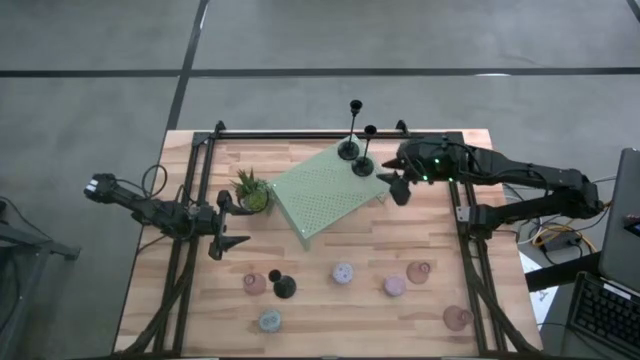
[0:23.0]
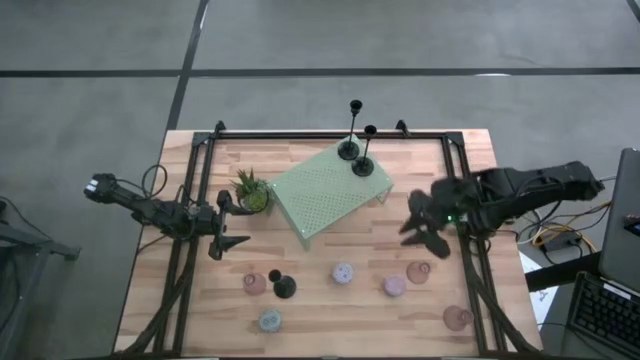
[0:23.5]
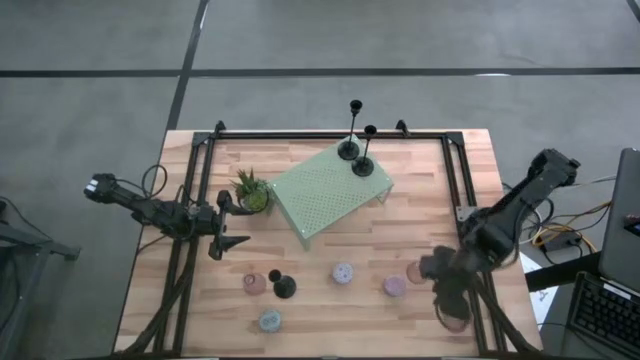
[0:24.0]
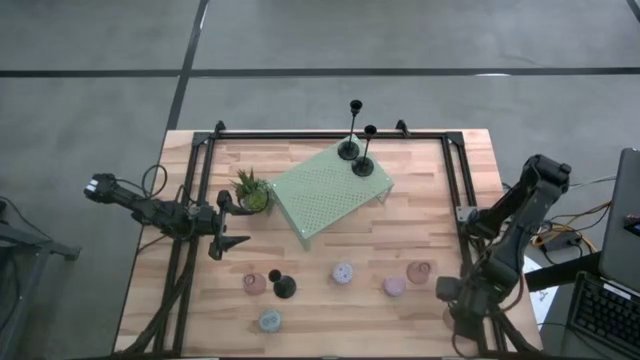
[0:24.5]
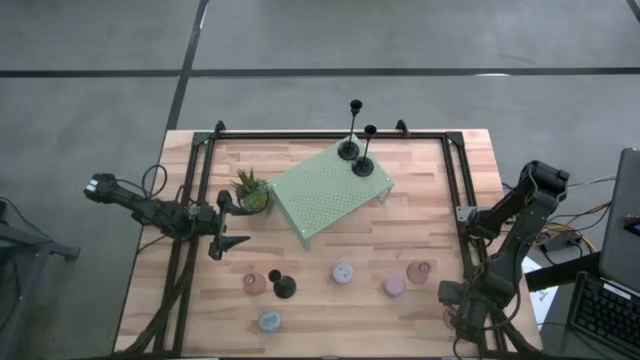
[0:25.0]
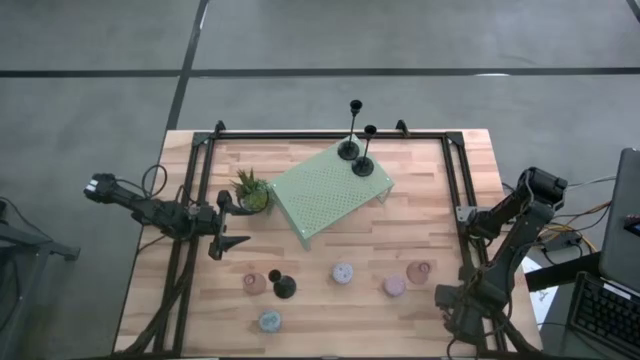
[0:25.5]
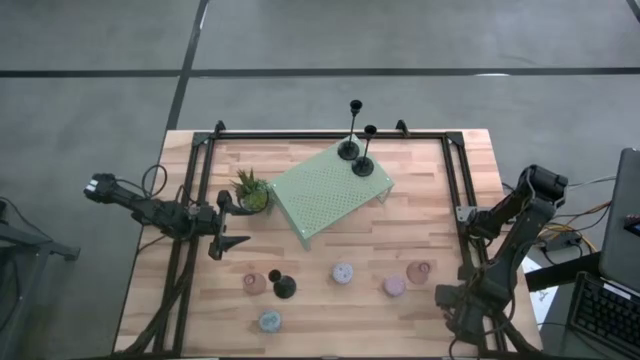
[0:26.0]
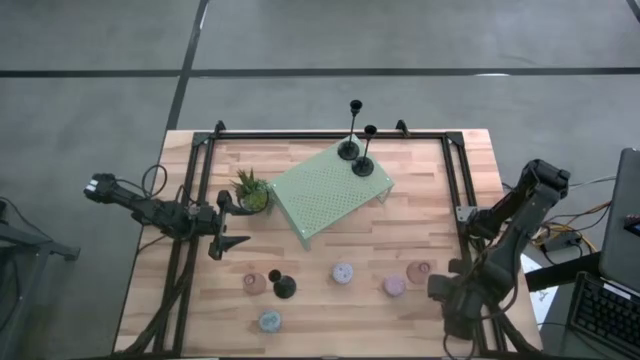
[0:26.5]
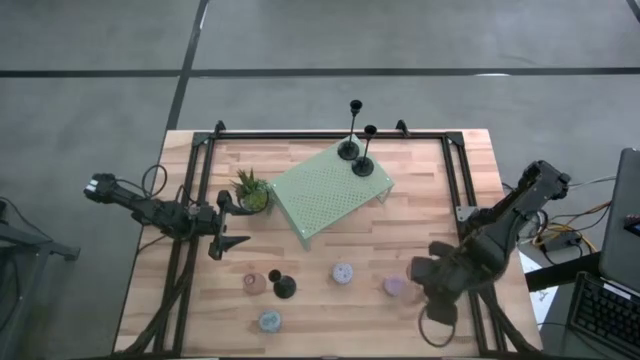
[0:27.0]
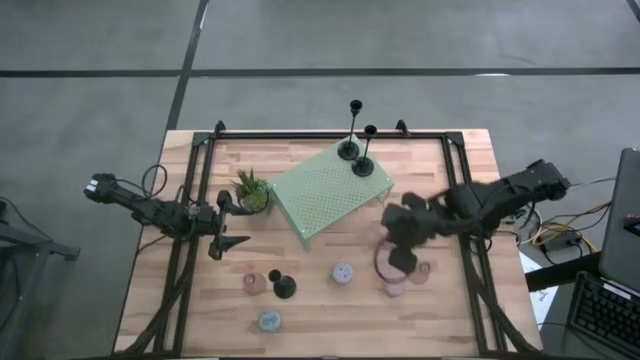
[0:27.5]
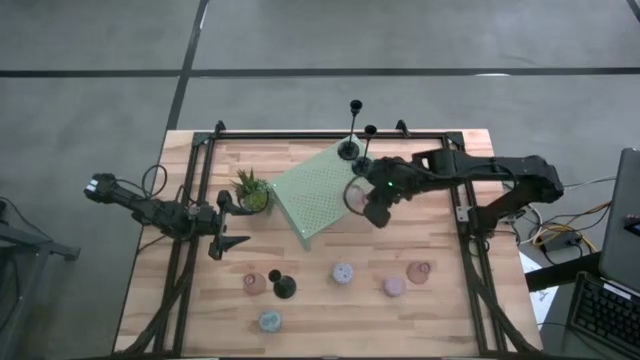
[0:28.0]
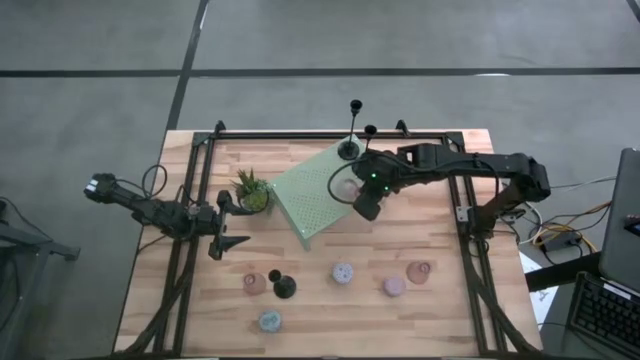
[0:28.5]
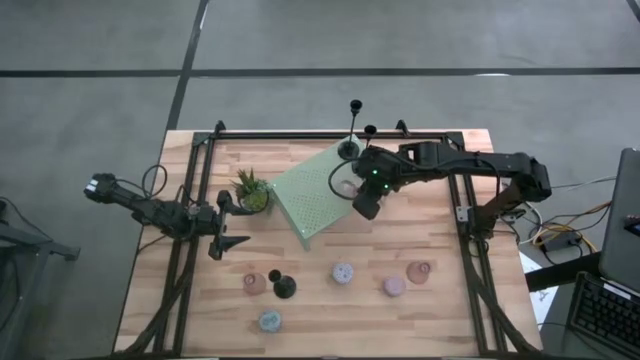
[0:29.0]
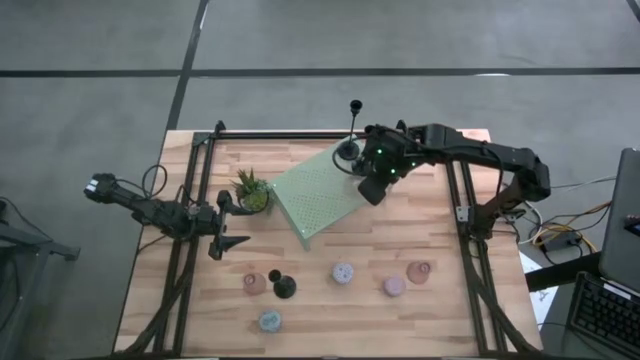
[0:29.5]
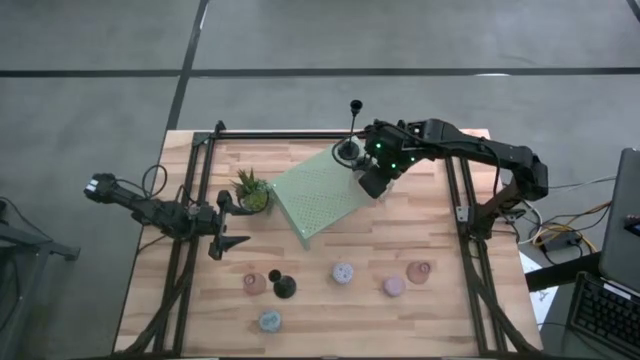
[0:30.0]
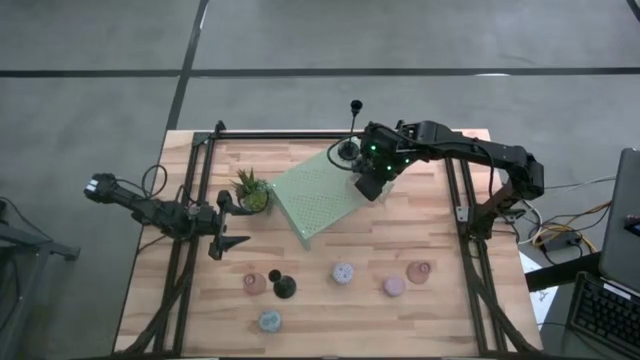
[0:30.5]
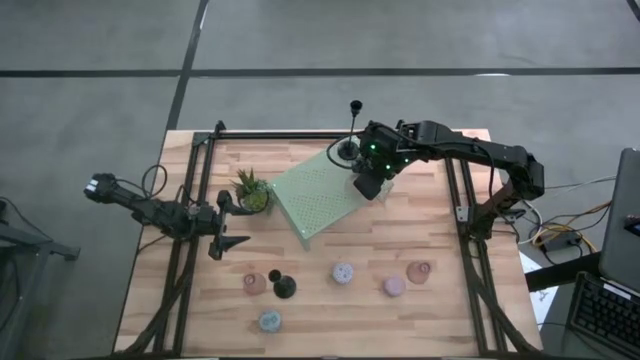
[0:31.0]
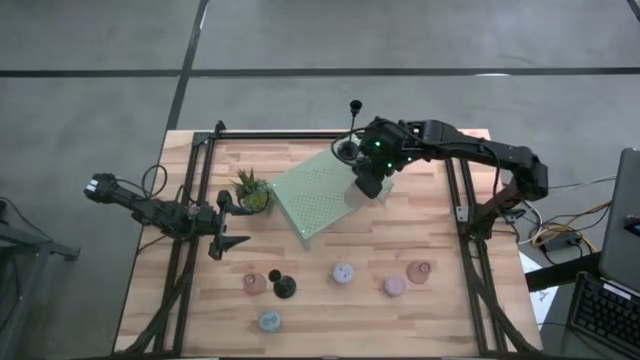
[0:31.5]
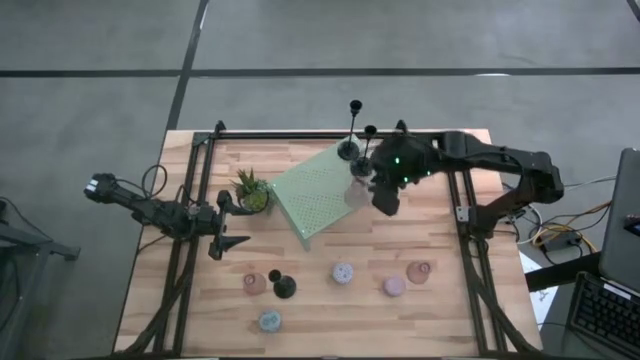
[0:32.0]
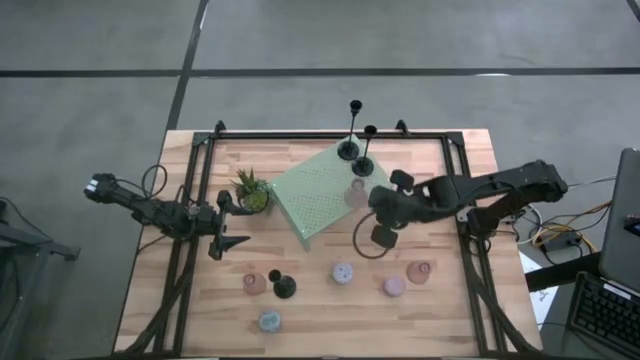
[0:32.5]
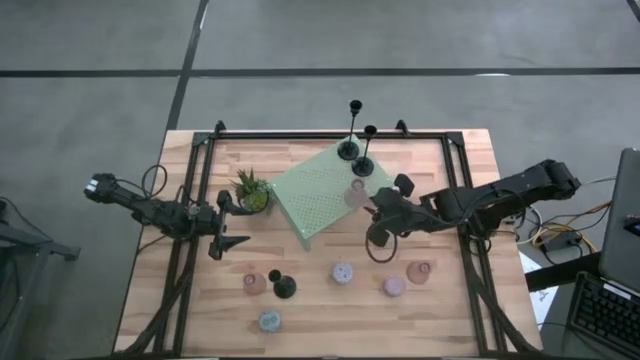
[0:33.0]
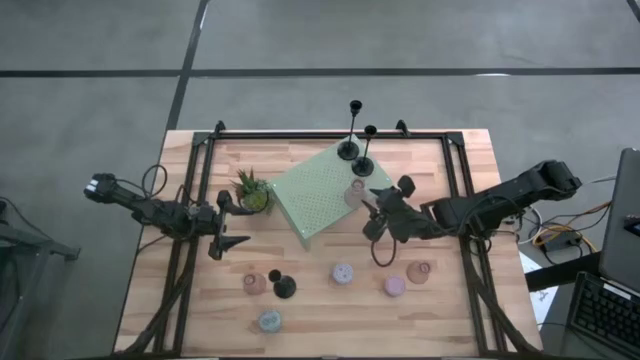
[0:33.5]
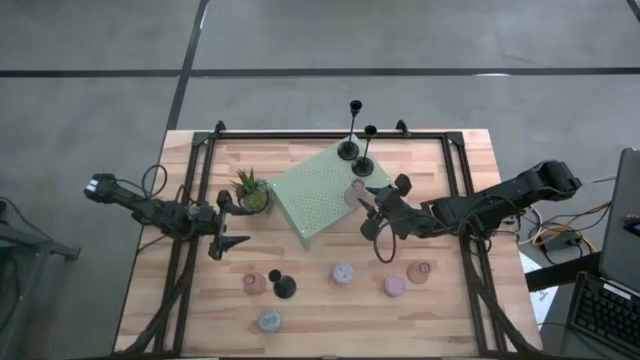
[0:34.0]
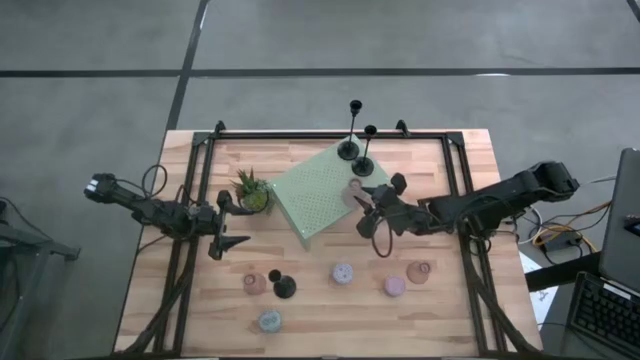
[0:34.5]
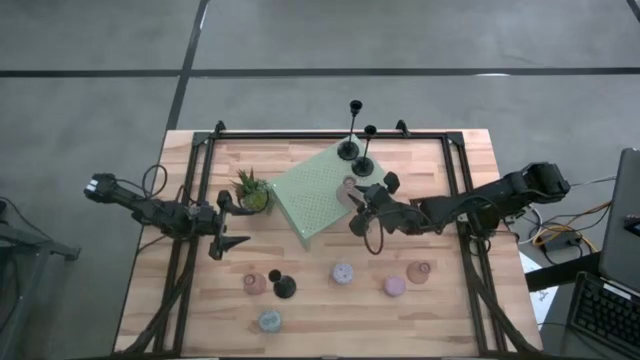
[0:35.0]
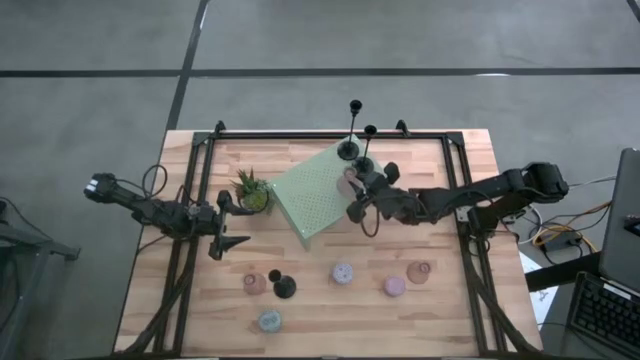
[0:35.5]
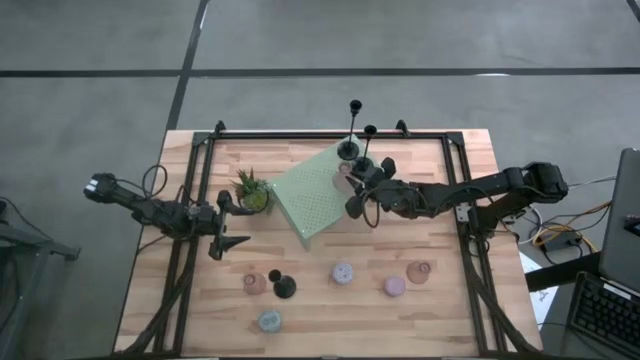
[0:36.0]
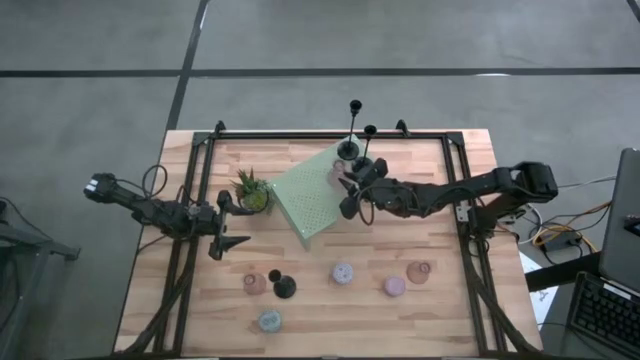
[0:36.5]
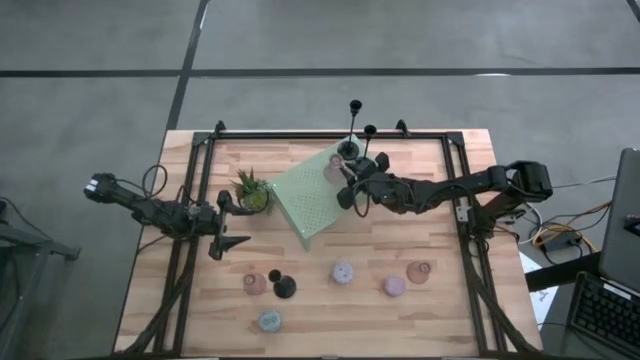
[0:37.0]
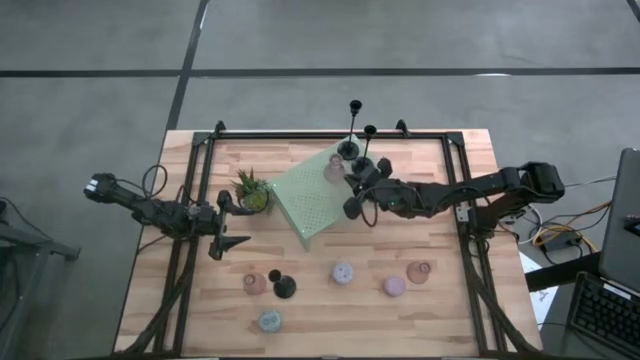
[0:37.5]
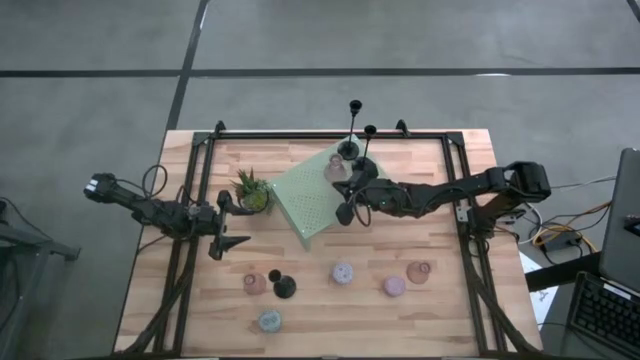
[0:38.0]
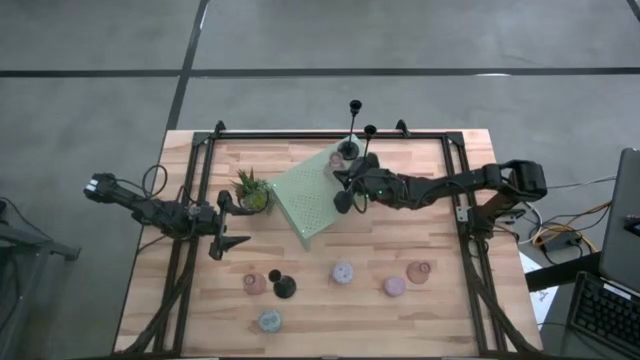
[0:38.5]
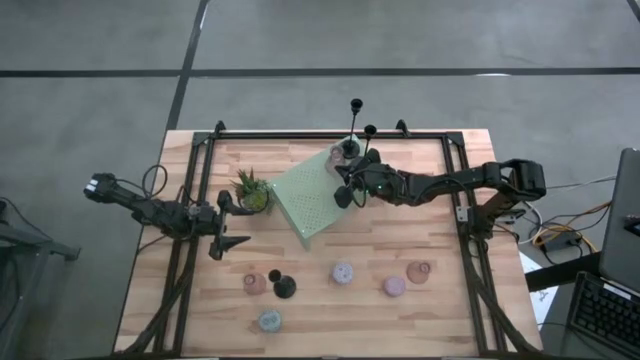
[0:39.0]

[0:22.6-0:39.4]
Task: Pick & Place candle stick holders
Put the bottom right pink glass candle holder on the shelf

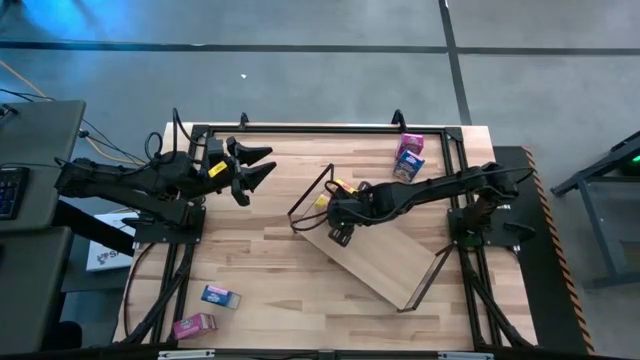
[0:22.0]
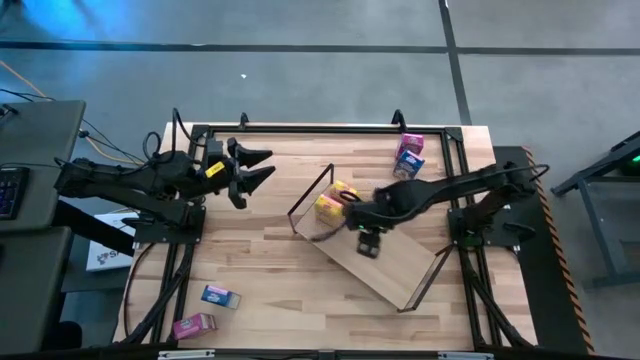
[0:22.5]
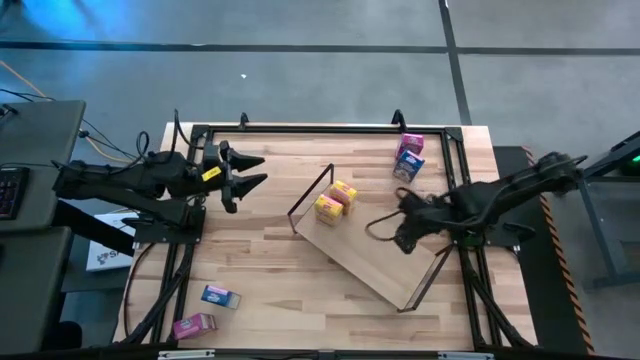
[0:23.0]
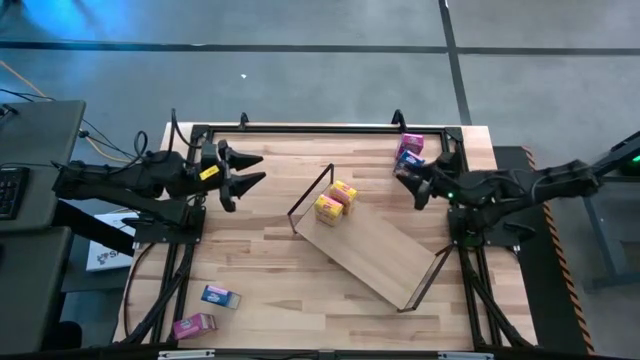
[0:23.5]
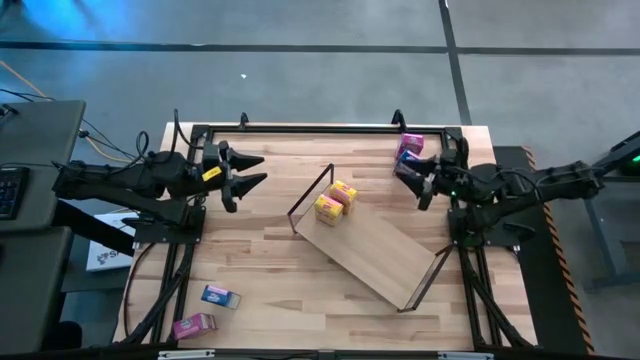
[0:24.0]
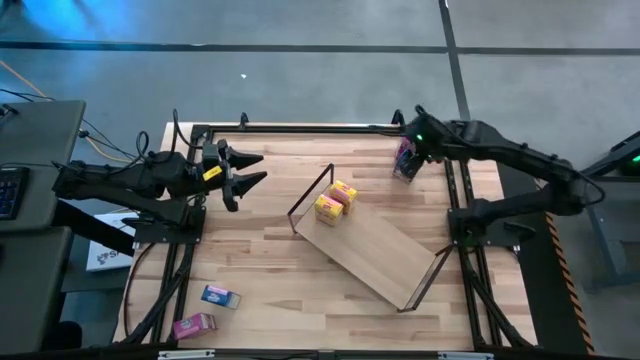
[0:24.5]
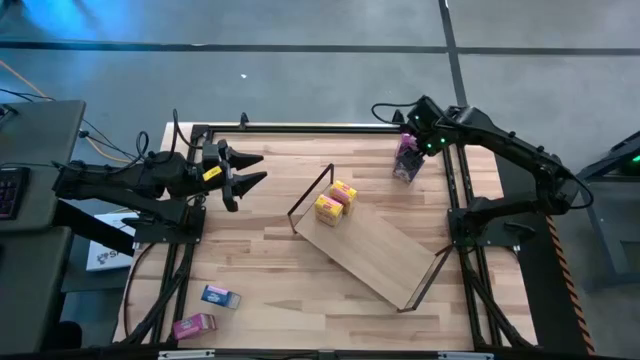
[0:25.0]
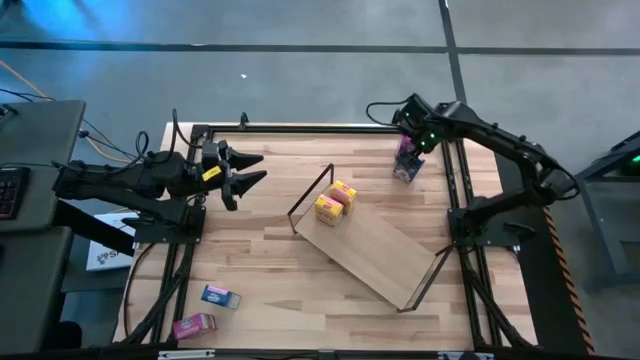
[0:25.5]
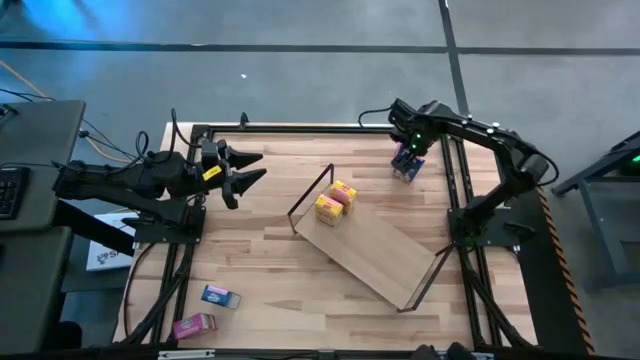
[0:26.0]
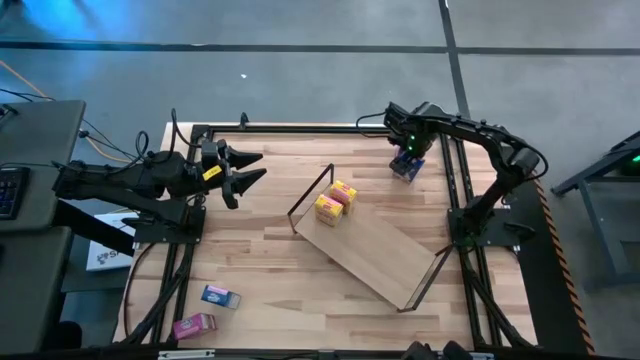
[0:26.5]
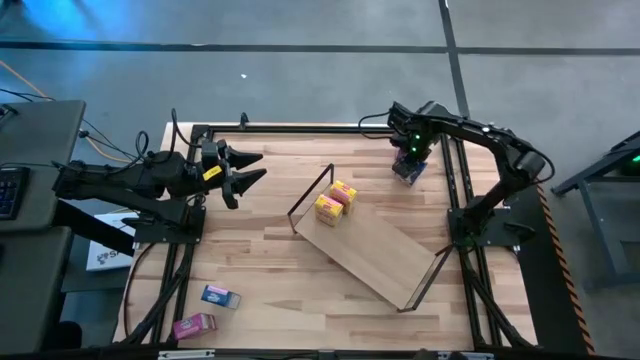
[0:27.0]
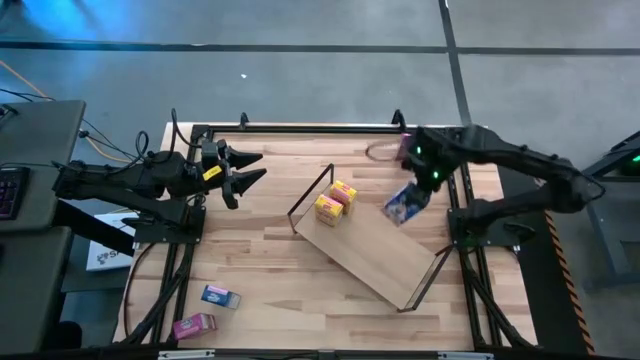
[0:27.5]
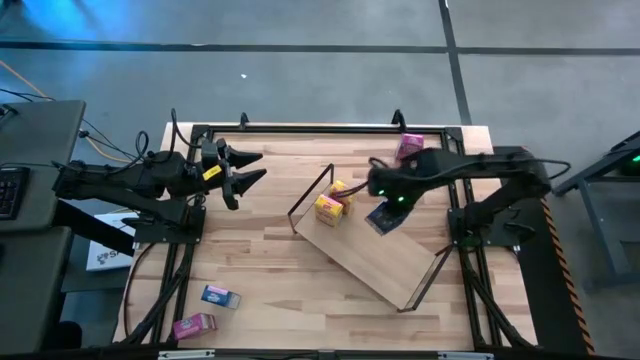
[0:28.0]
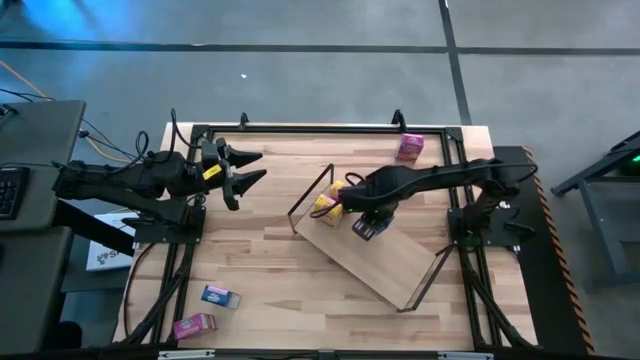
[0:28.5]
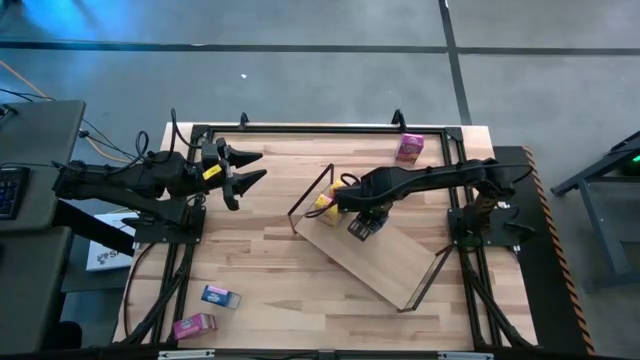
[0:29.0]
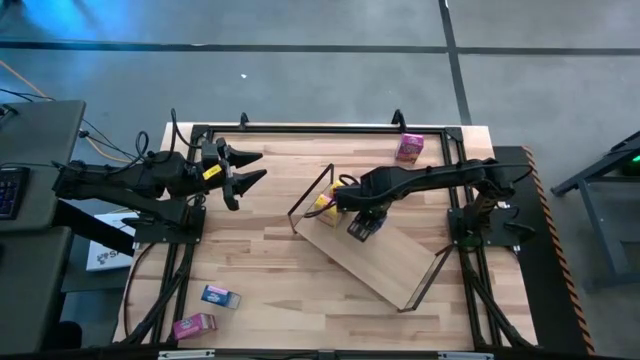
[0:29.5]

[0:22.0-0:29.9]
Task: Stack cereal on shelf
Put the top blue cereal box on the shelf
